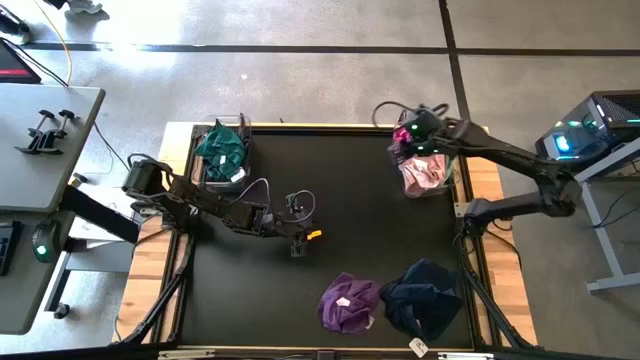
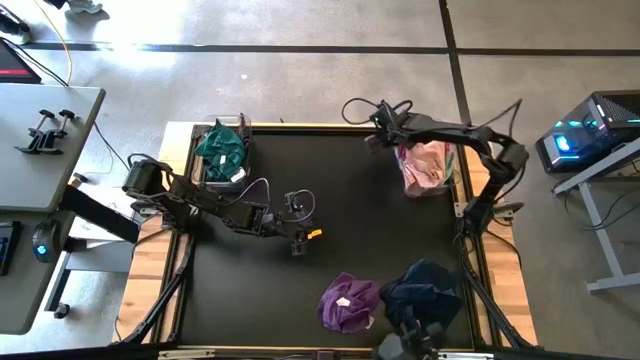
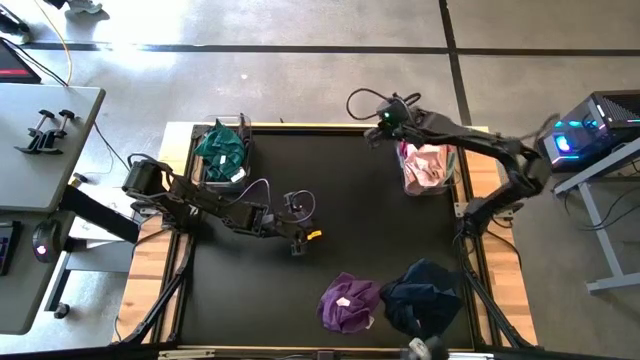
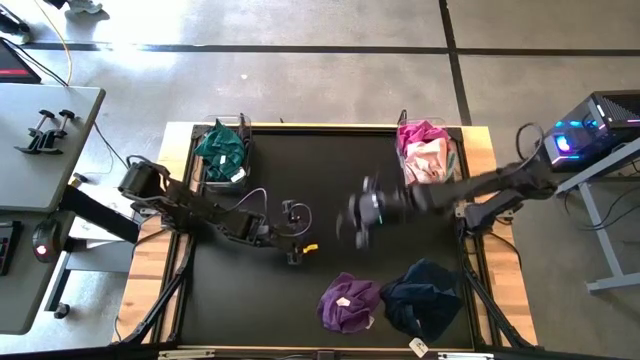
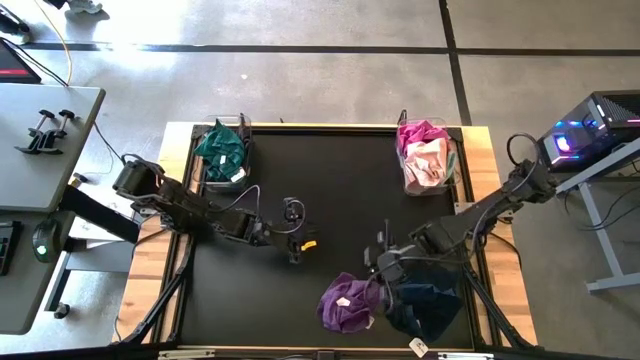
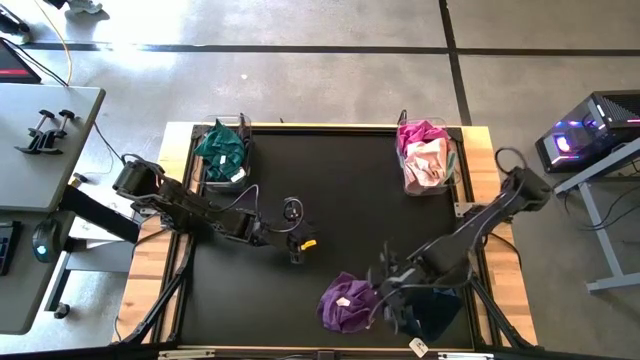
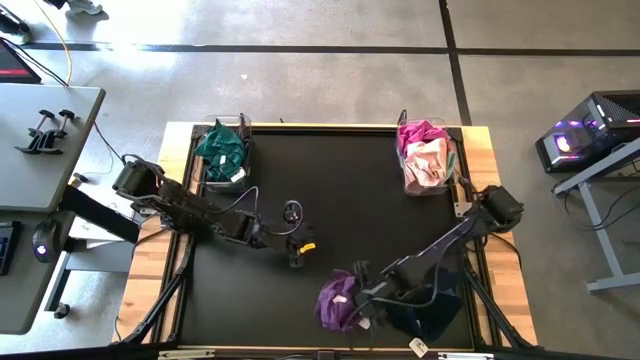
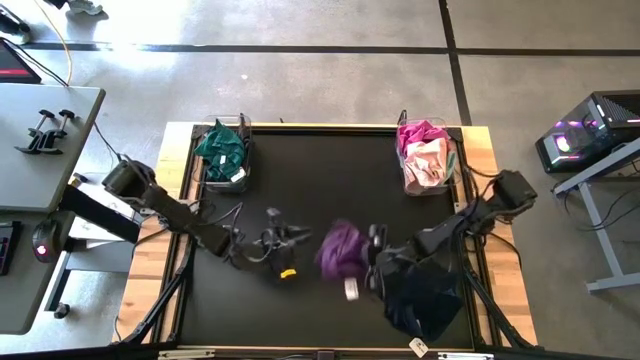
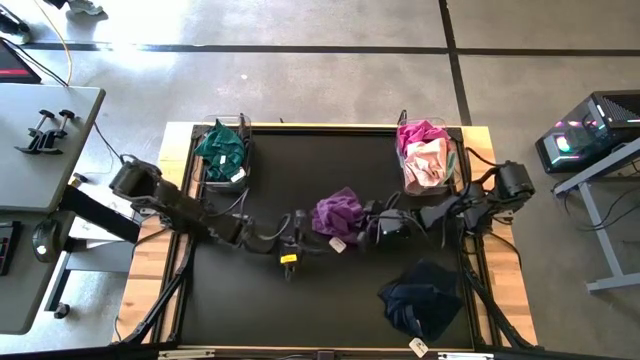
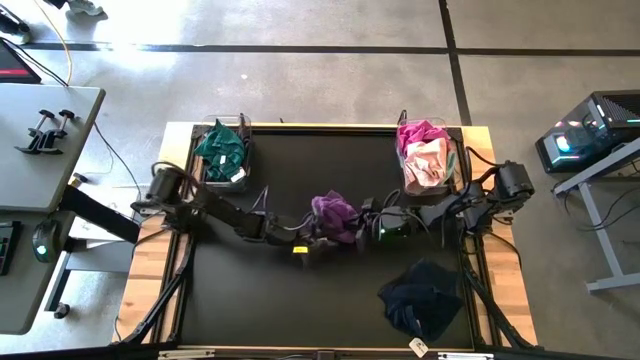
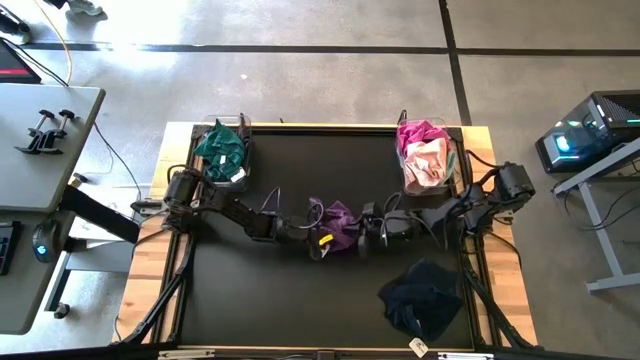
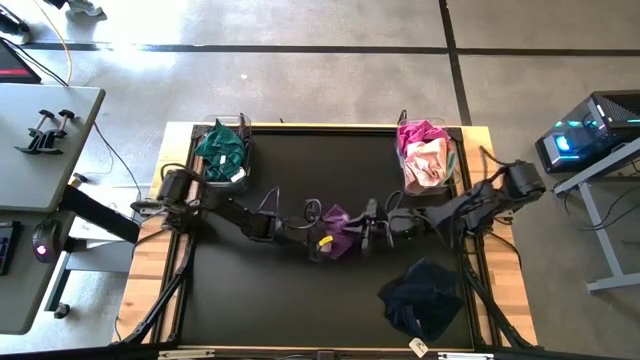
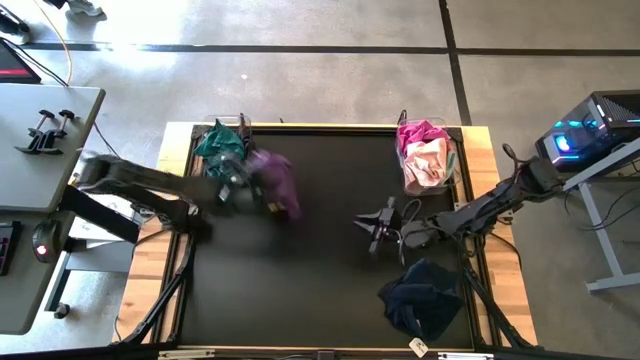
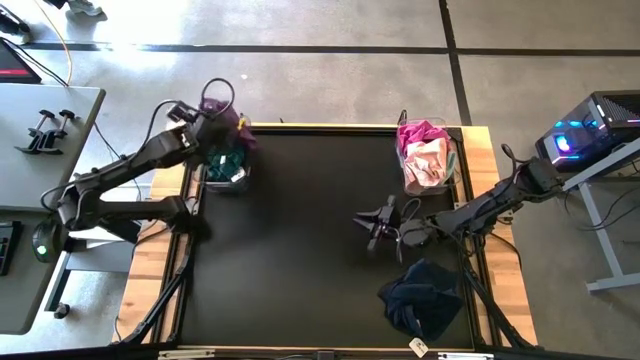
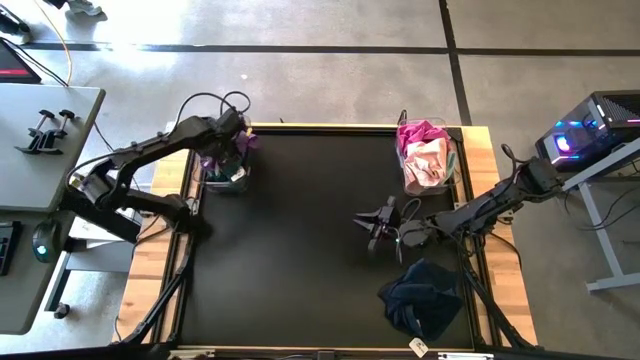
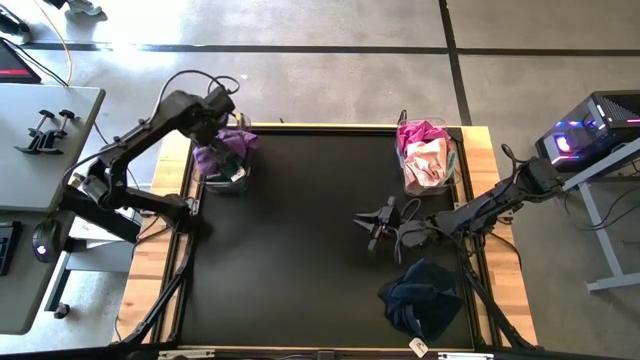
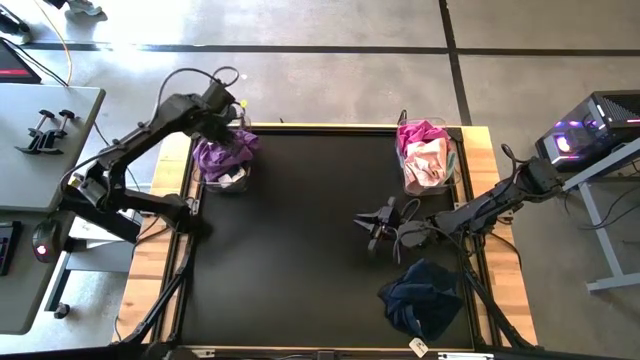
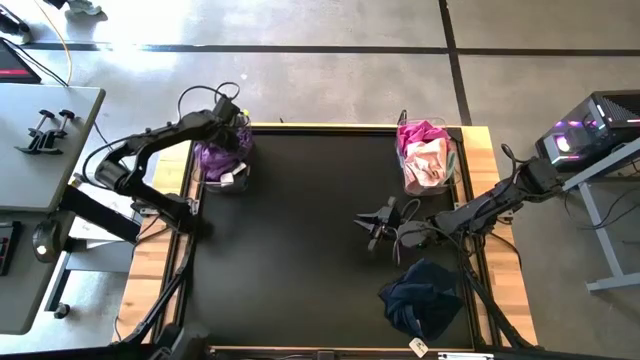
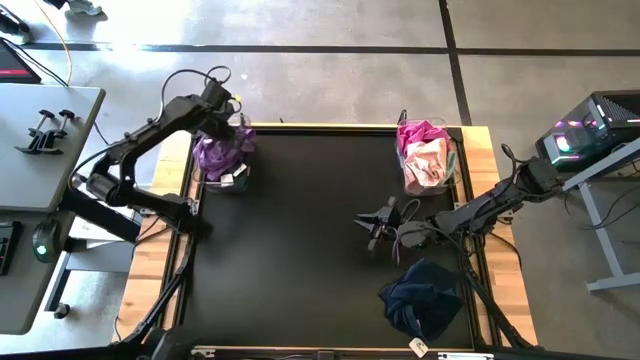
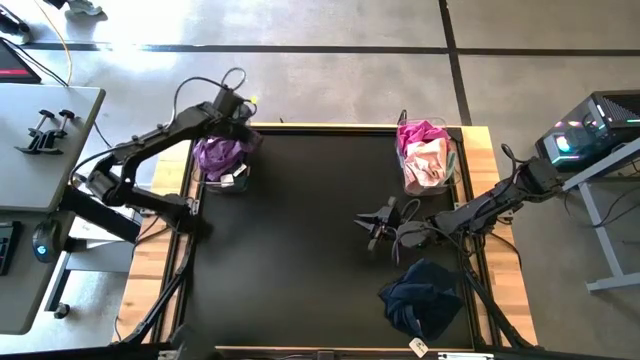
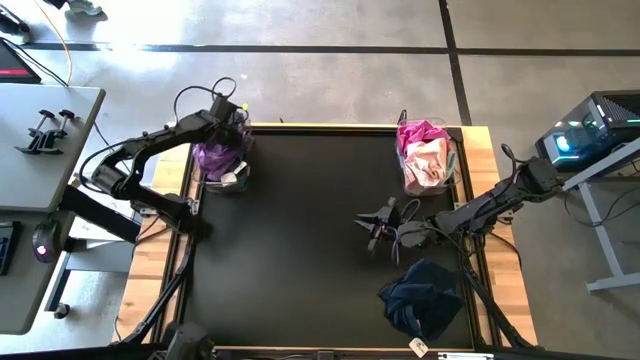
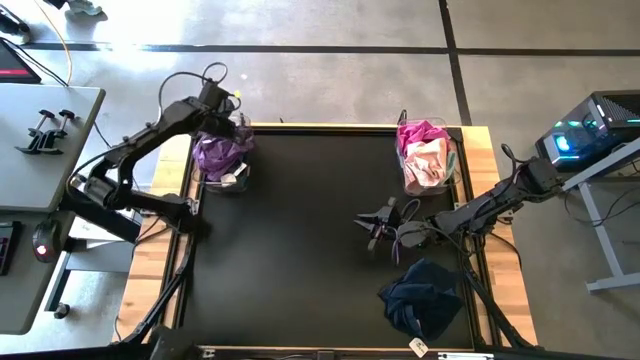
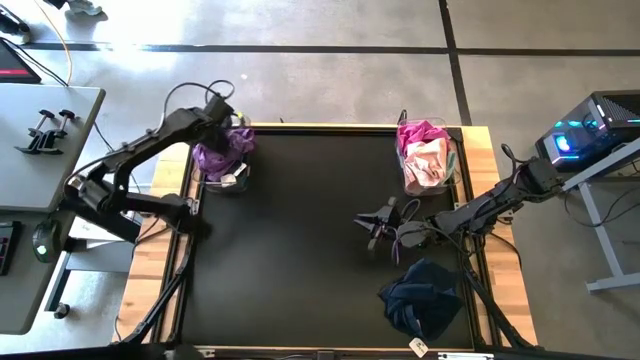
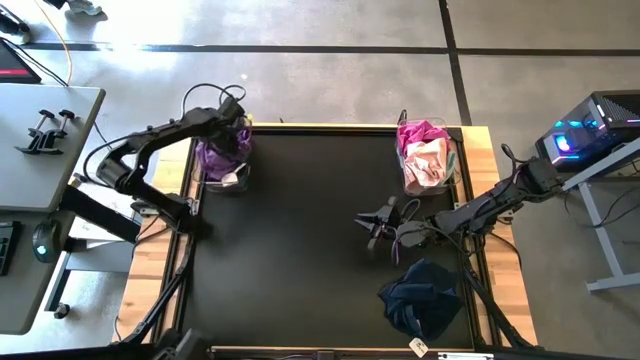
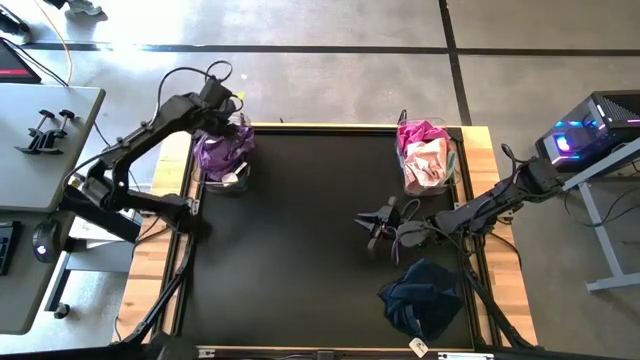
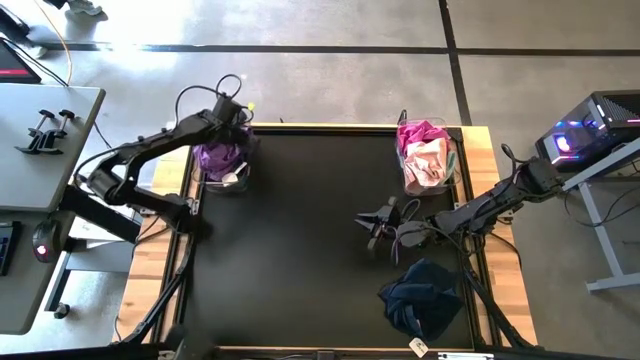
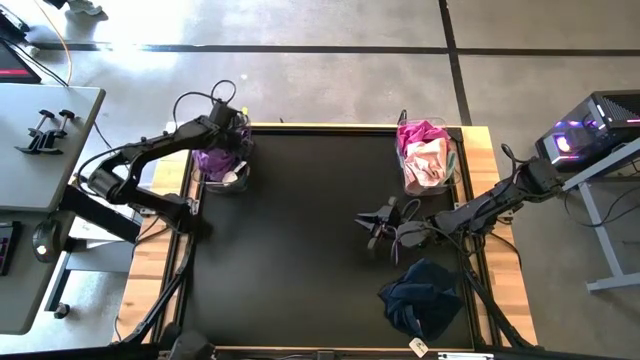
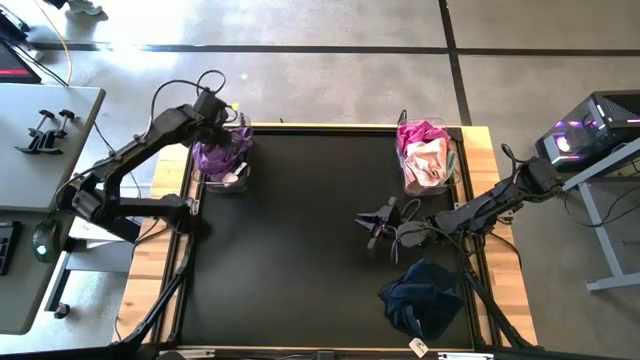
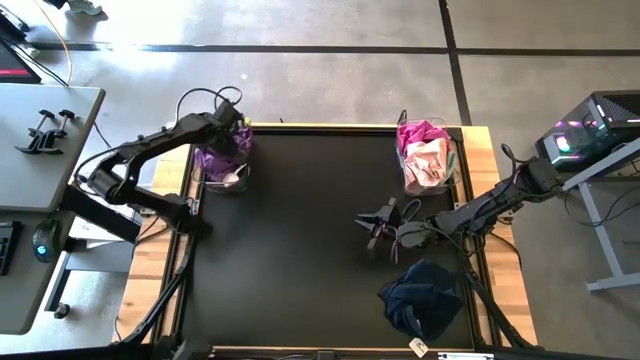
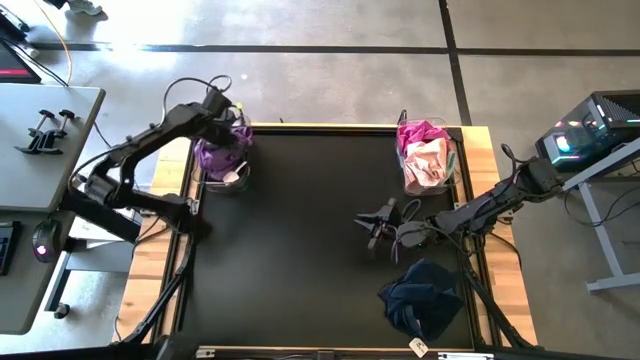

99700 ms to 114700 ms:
Task: Sort towels by color in basket
Put the violet microfiber cloth into the left transparent bin

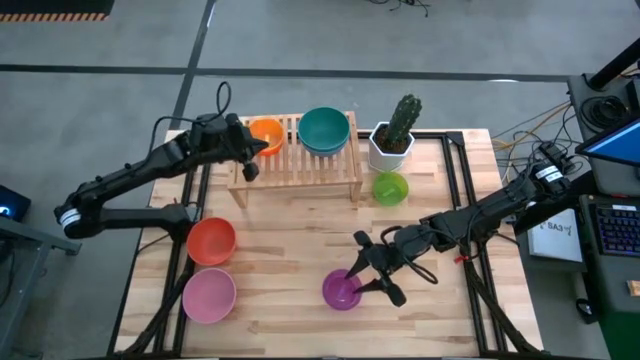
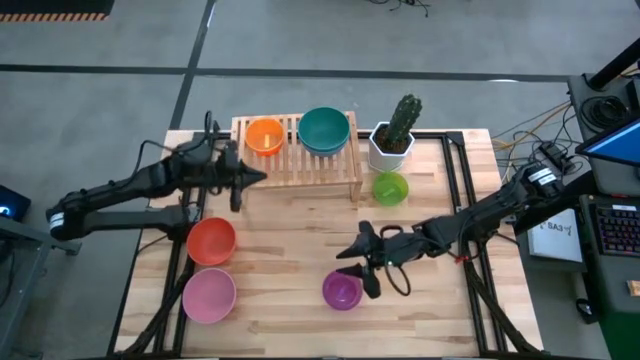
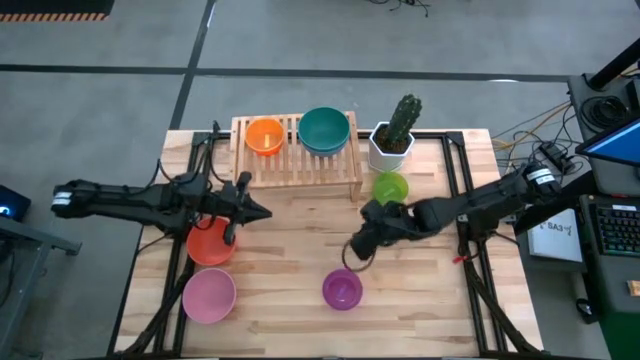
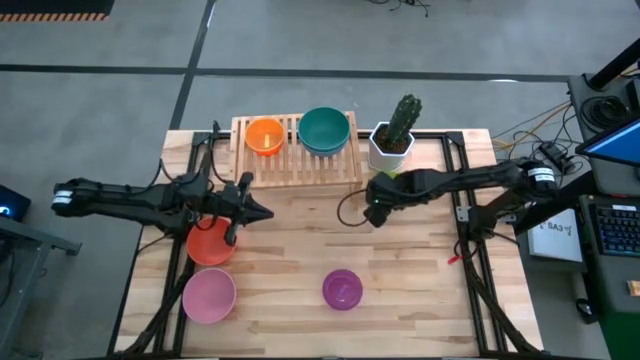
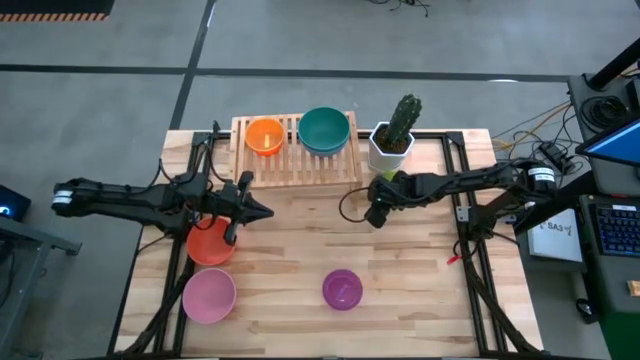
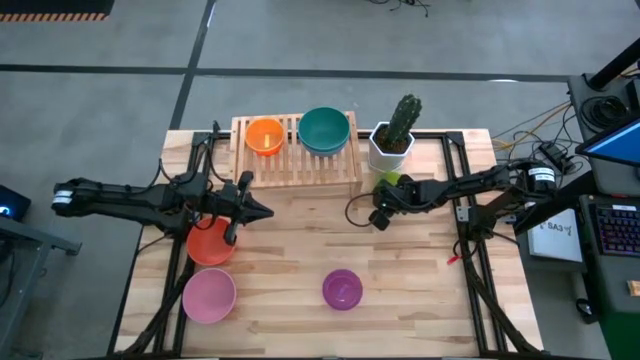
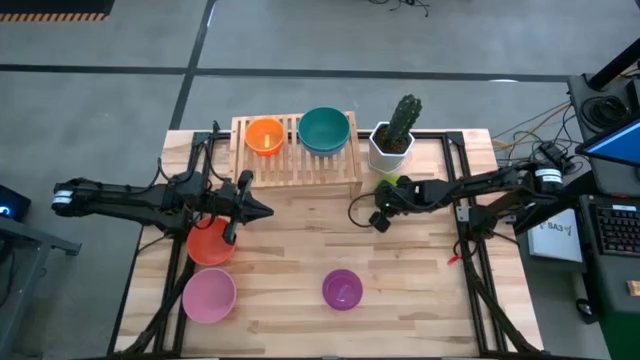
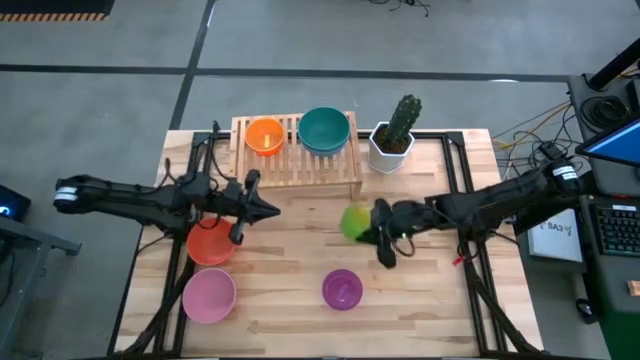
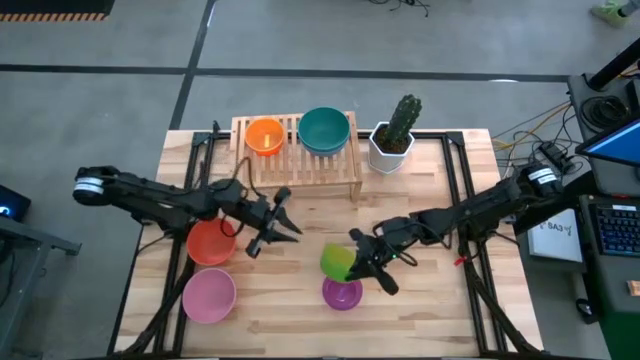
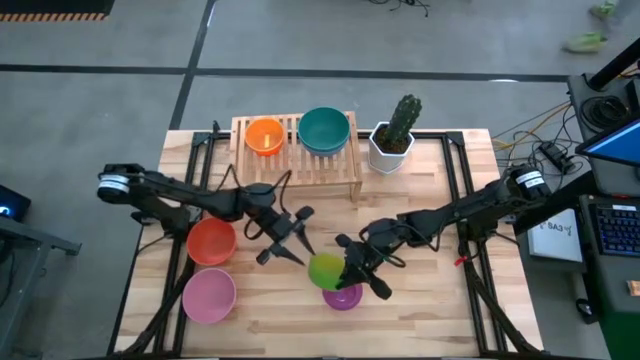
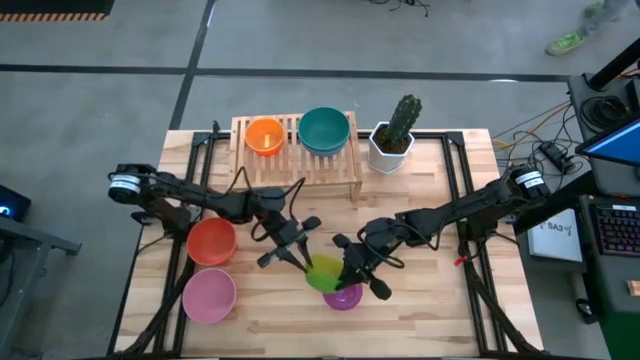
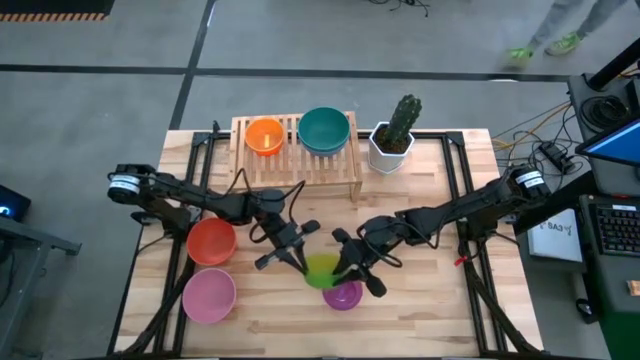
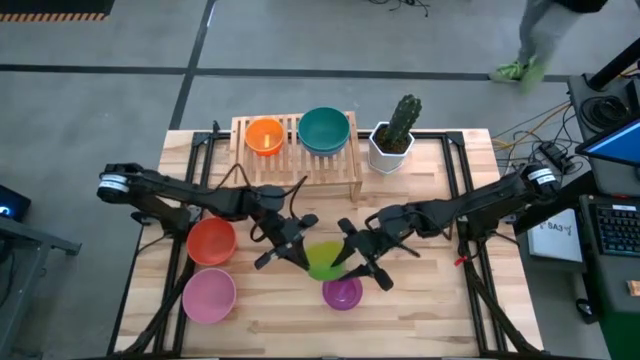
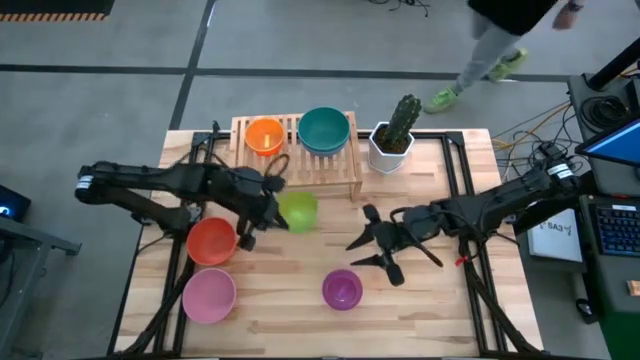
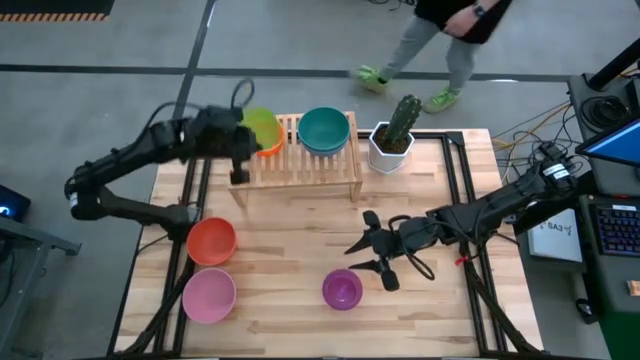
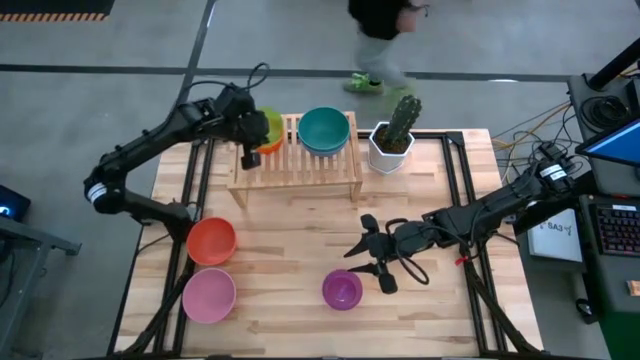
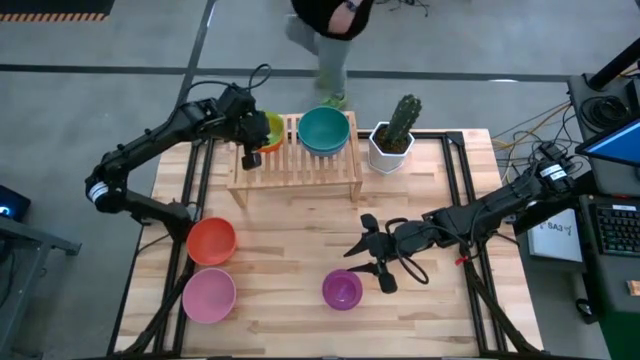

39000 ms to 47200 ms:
Task: Place and stack bowls onto a shelf
Stack the green bowl on top of the yellow bowl on the shelf
